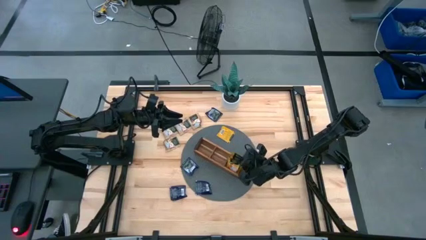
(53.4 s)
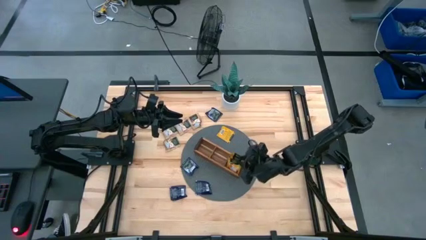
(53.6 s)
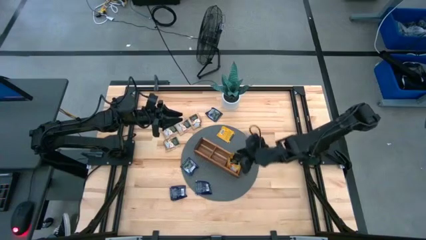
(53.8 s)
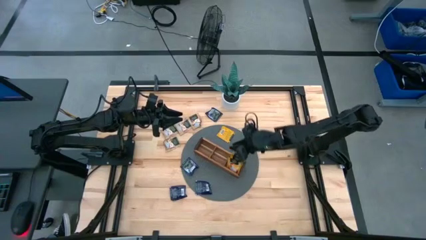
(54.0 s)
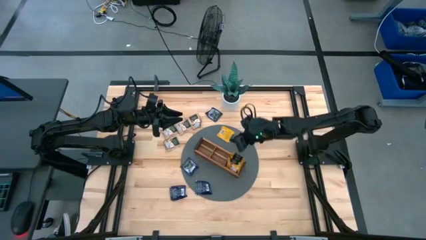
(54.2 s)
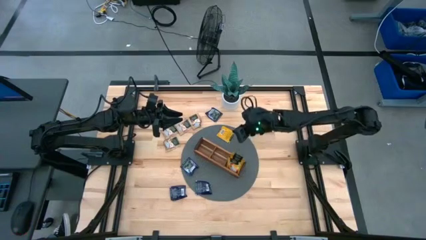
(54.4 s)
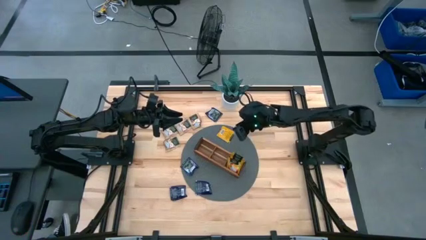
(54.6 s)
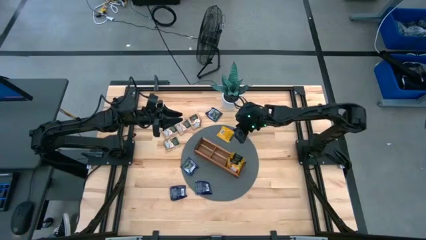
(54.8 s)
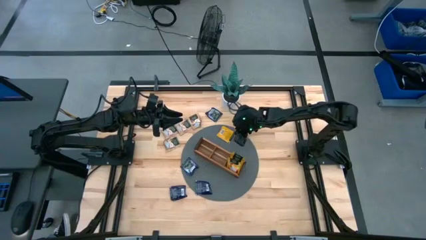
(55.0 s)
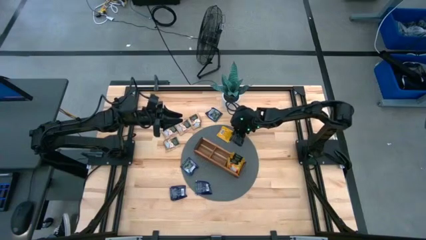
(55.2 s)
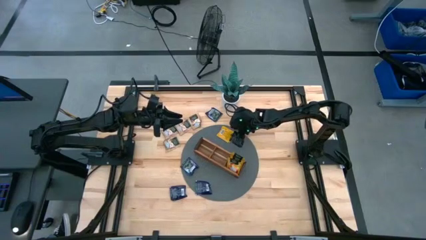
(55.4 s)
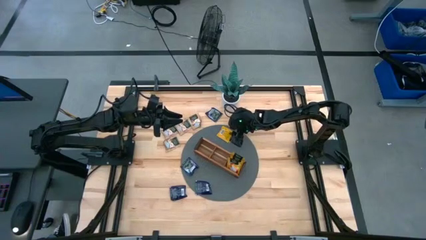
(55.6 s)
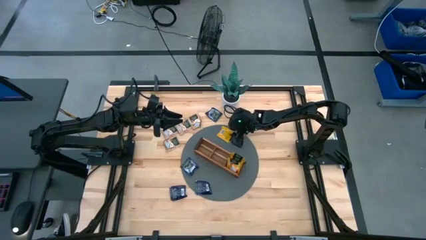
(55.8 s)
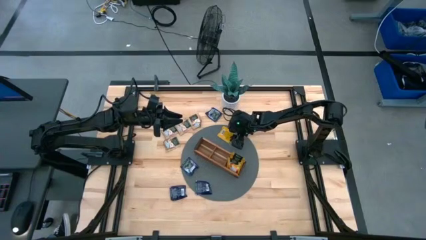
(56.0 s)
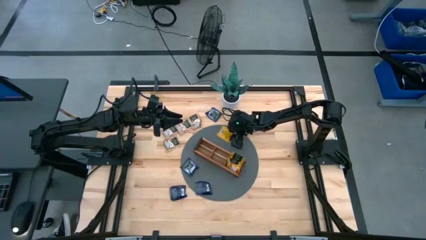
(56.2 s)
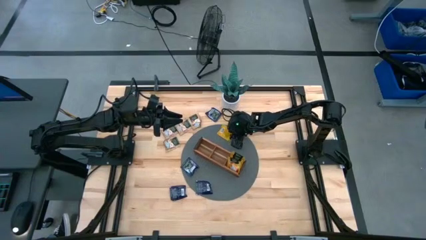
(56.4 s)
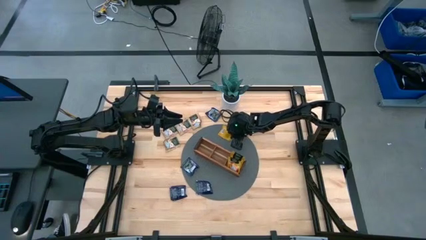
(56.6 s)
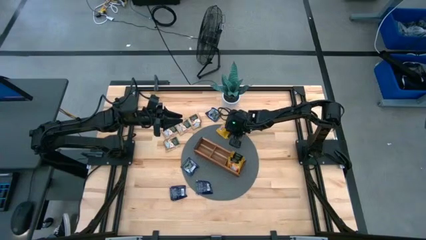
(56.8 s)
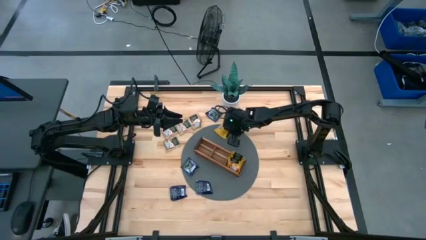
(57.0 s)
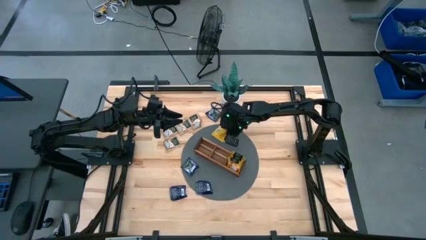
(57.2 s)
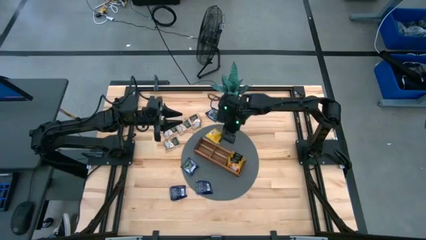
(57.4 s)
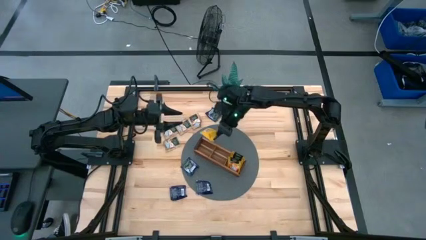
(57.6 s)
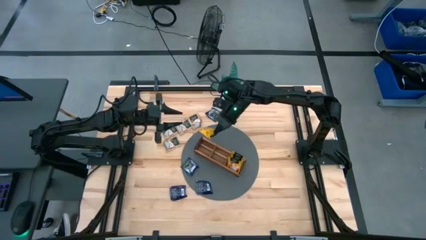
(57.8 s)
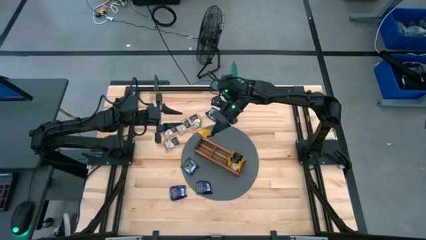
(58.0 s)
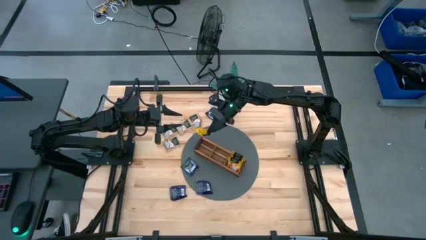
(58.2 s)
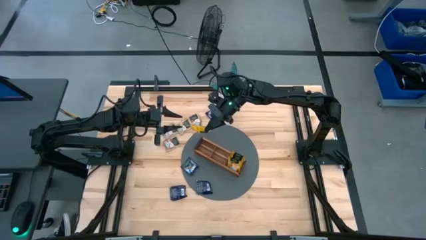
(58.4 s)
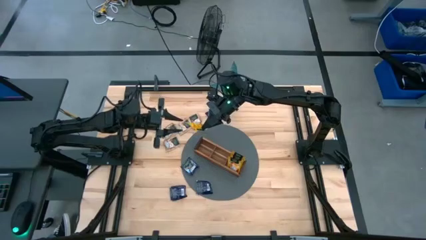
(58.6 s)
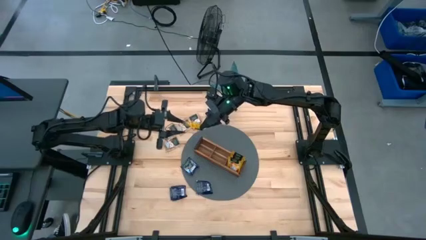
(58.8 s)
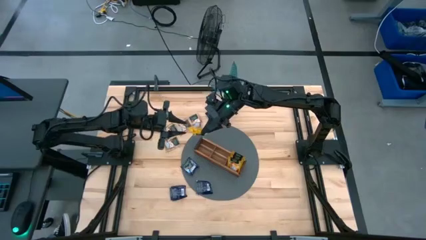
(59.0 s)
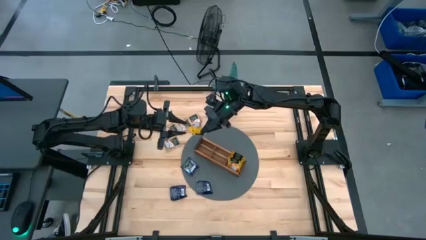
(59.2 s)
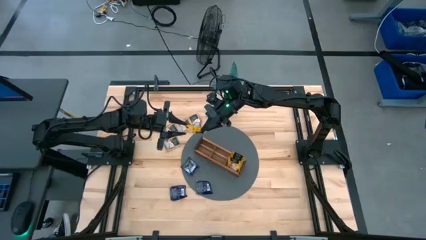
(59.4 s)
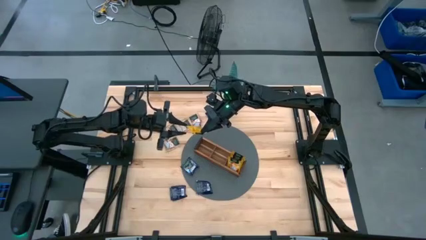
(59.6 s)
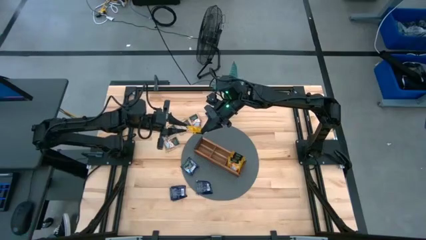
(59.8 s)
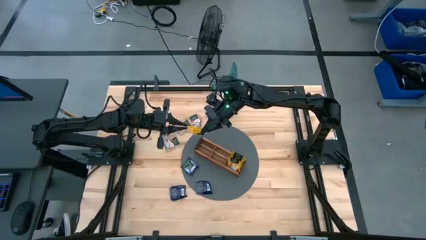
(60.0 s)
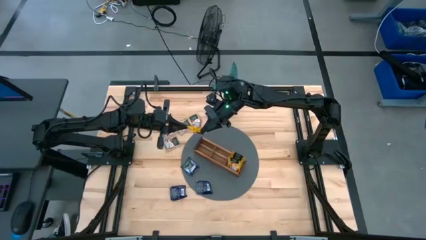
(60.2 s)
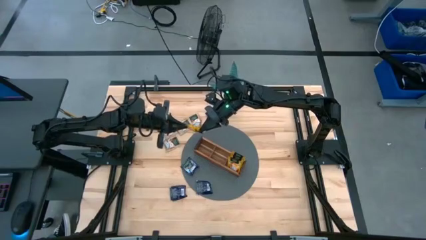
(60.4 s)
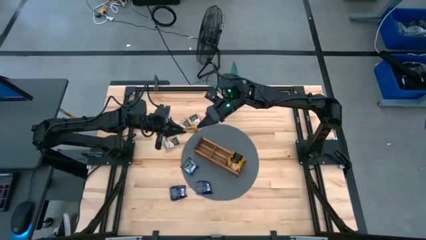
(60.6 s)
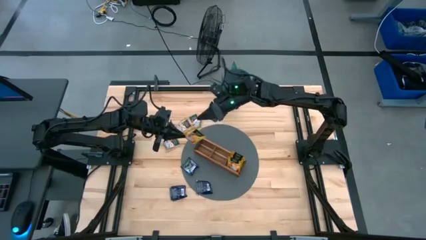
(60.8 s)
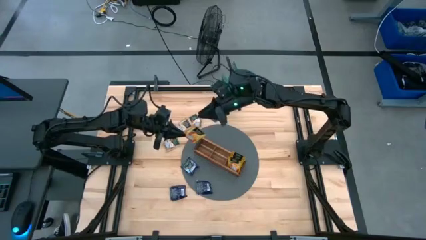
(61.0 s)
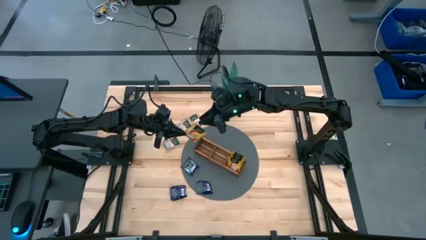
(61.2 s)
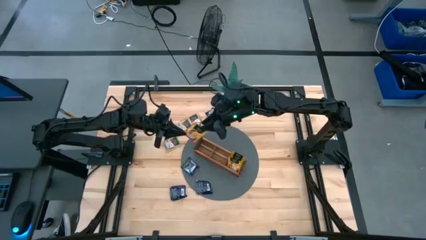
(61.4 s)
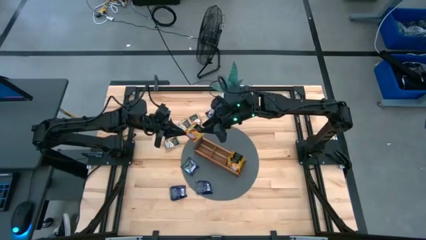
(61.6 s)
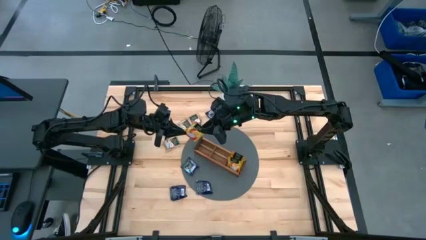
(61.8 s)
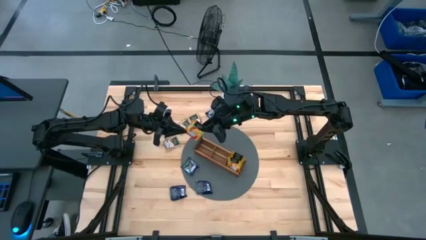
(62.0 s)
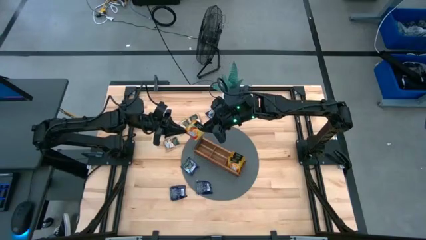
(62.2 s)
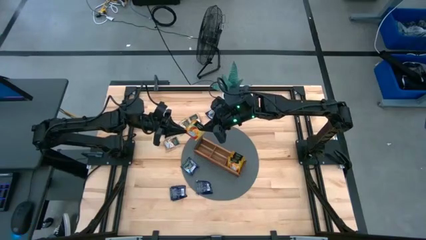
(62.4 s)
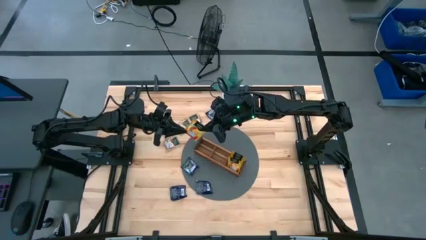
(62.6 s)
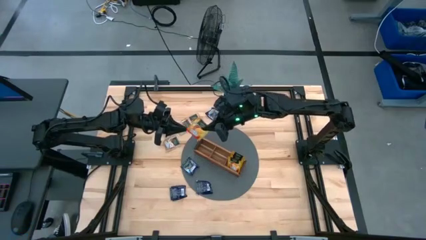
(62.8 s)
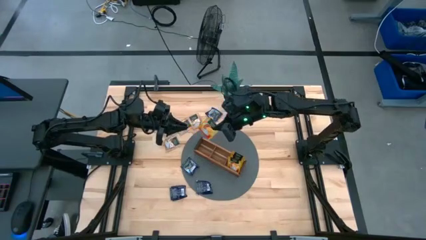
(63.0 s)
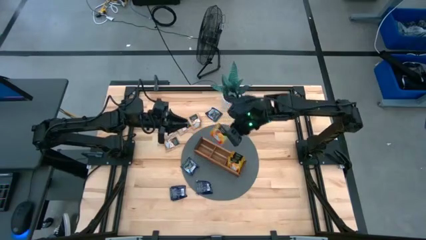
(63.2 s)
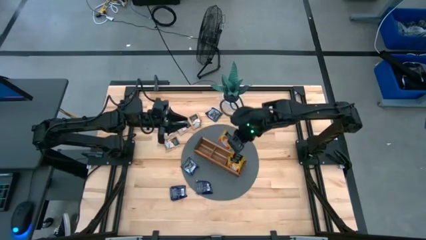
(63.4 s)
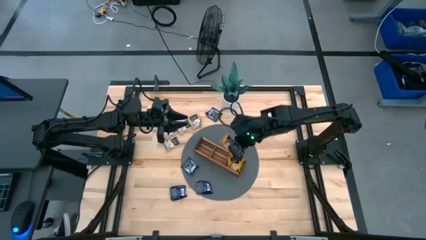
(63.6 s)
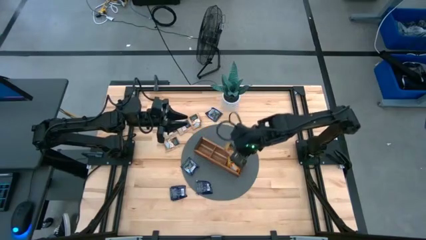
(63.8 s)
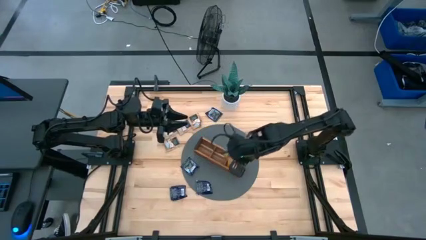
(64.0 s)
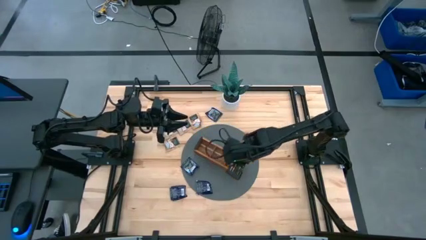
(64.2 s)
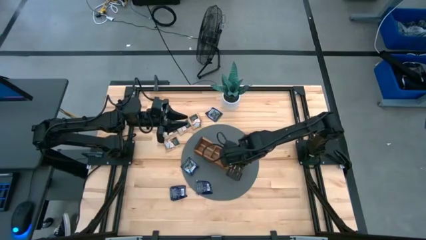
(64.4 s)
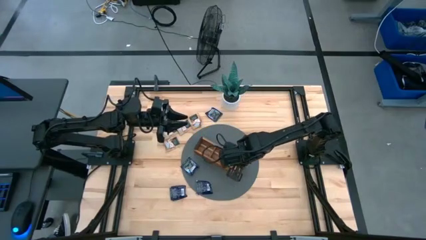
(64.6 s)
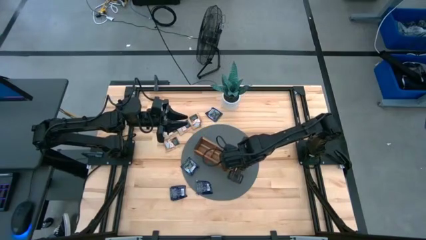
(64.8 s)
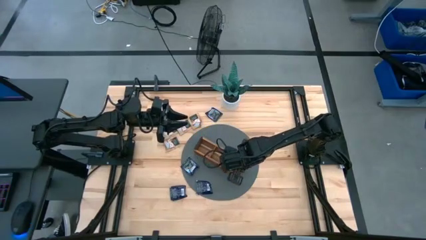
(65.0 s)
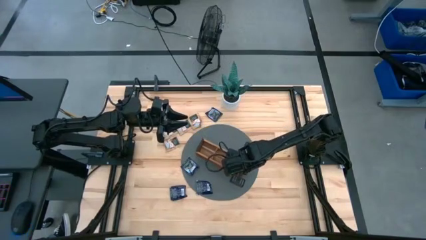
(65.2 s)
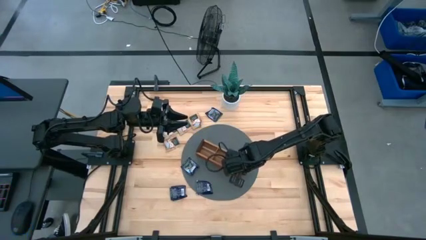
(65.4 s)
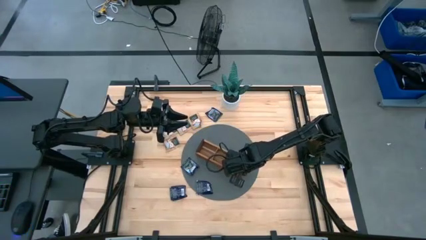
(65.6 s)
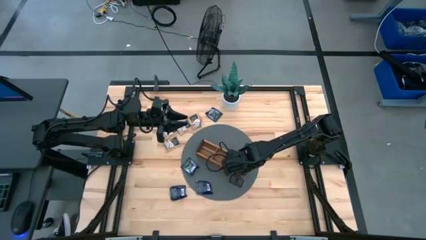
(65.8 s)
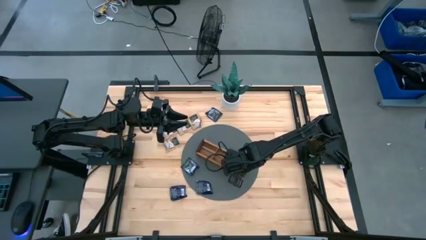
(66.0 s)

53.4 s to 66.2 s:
Task: Pick & Place Tea
Put the yellow tea bag into the right section of the wooden organizer

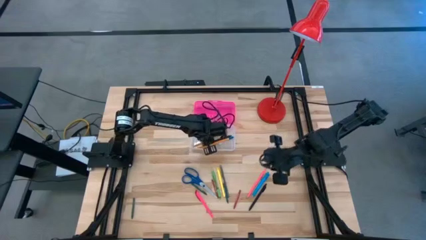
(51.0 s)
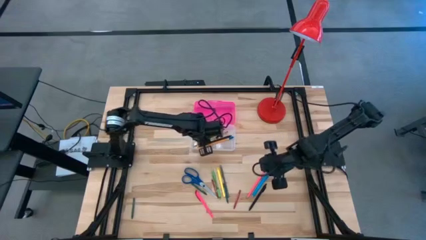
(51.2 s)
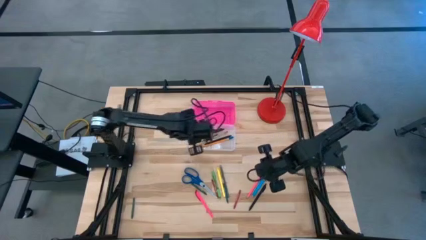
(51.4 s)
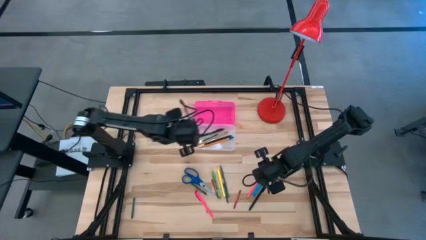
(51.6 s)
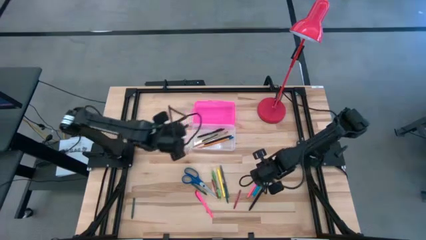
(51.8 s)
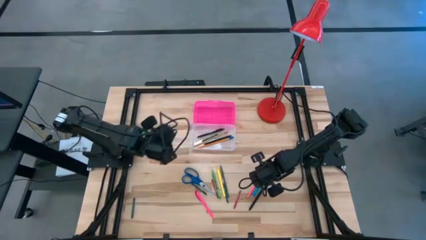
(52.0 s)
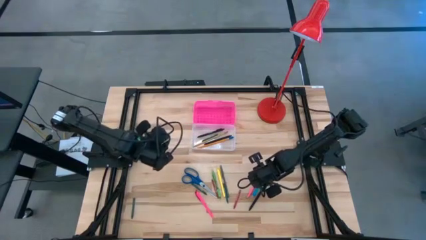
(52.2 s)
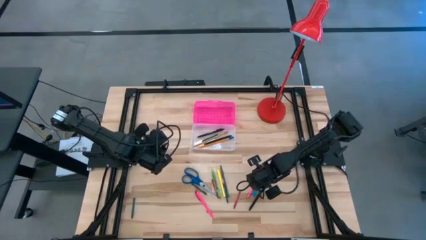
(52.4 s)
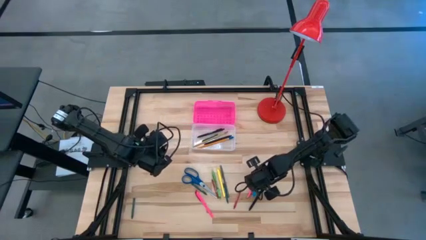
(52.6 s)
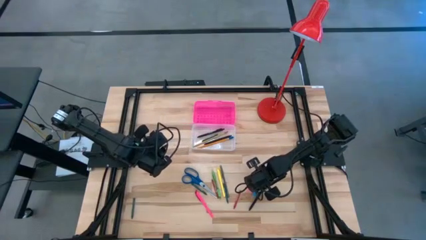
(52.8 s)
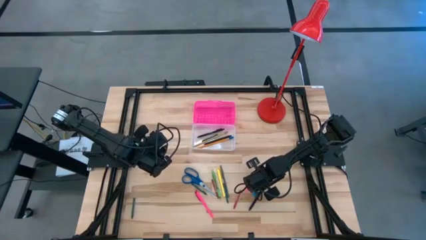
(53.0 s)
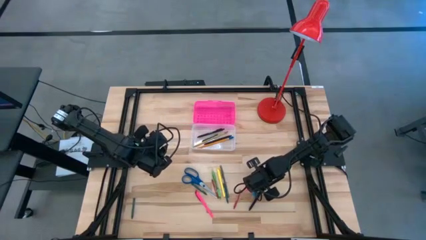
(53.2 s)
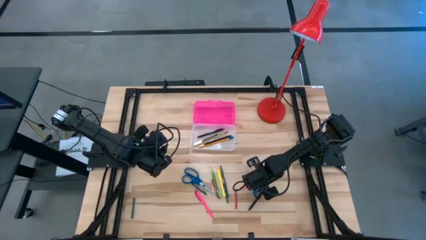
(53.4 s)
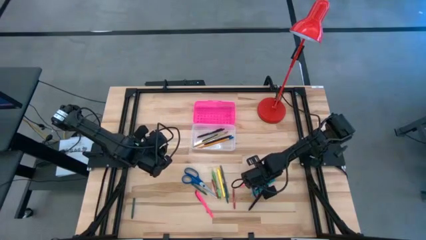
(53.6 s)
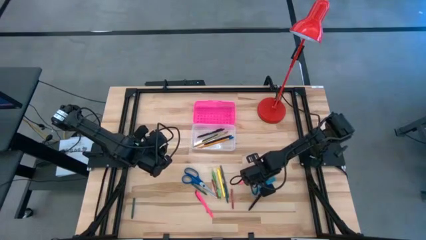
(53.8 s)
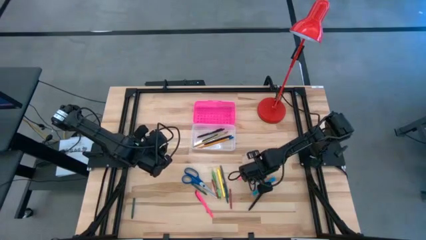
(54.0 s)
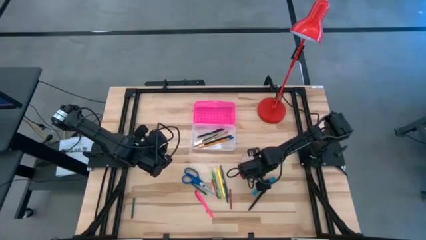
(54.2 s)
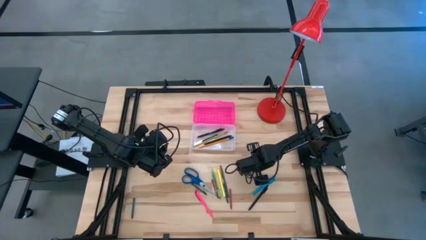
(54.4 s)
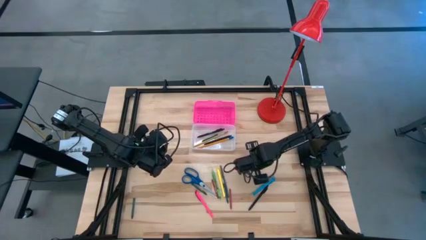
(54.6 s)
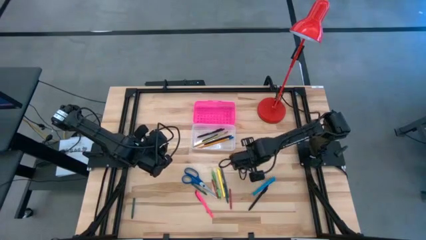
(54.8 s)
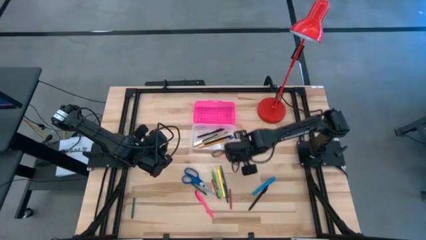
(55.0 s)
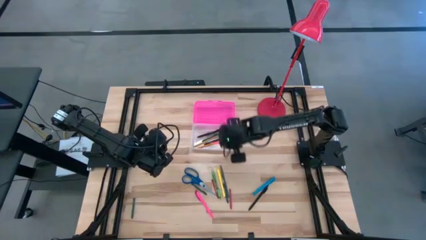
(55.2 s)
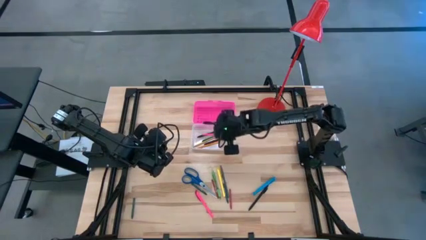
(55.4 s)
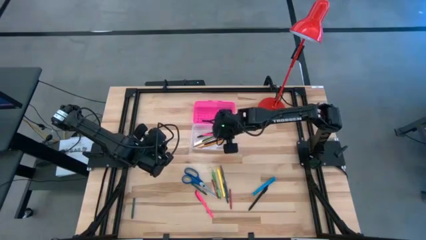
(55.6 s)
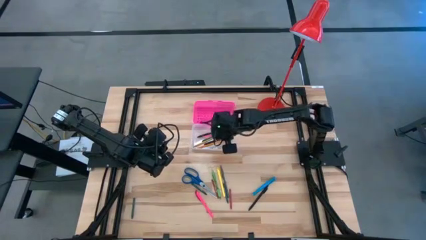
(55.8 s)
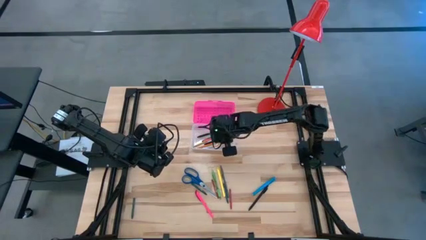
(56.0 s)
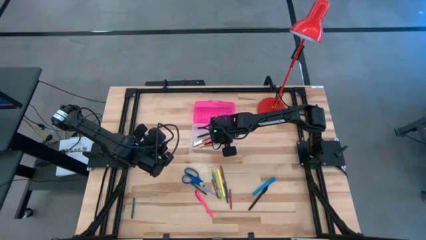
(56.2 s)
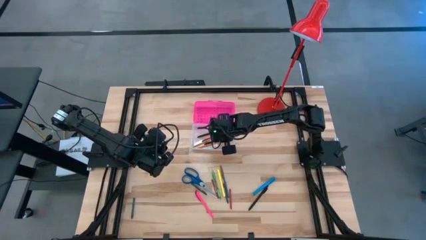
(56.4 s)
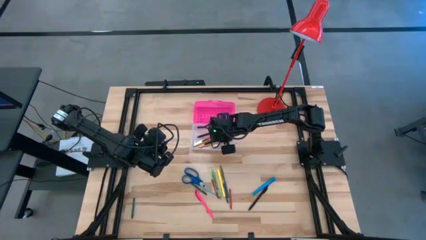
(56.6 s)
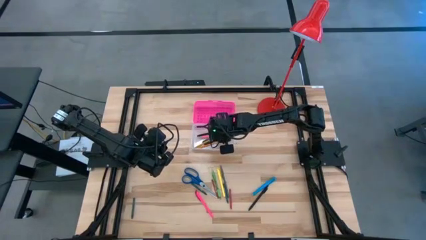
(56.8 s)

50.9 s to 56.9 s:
Task: Pick & place school supplies into a supply box
Put the pink pencil into the pink supply box
